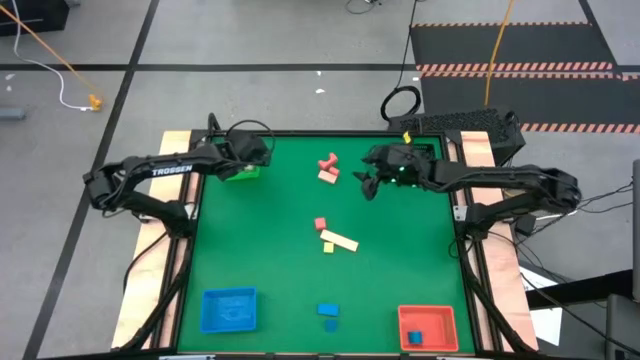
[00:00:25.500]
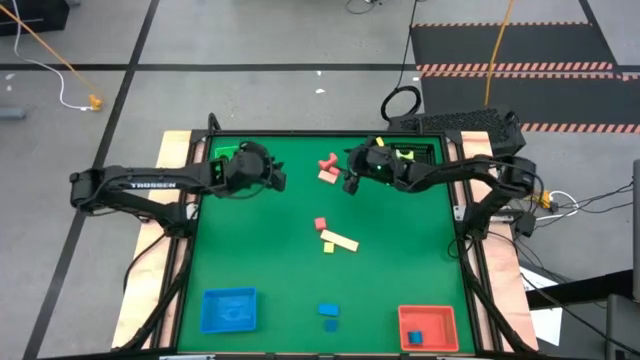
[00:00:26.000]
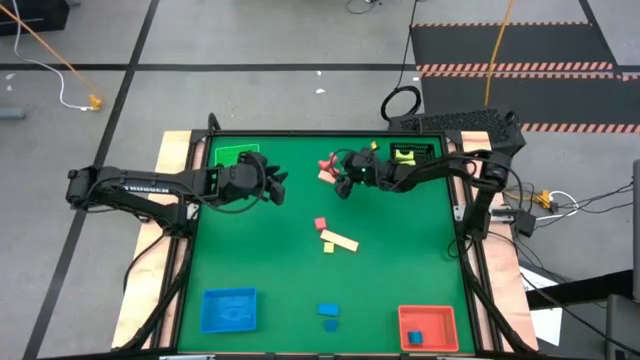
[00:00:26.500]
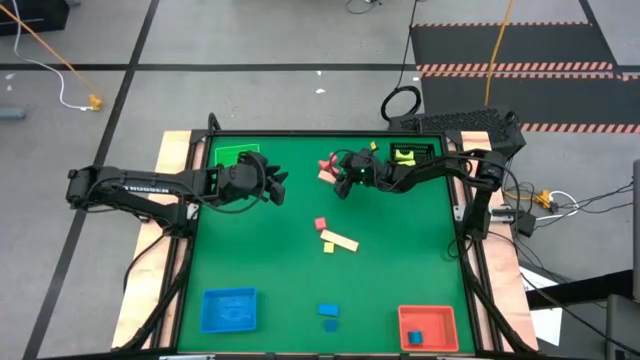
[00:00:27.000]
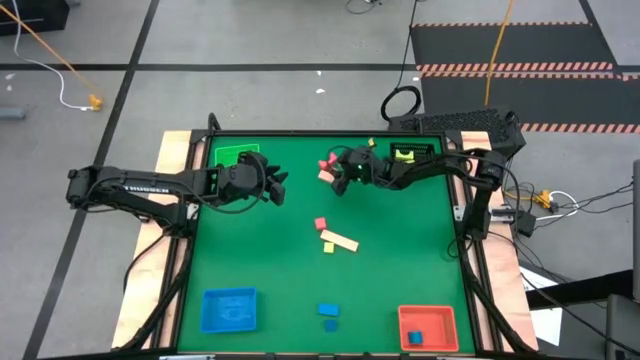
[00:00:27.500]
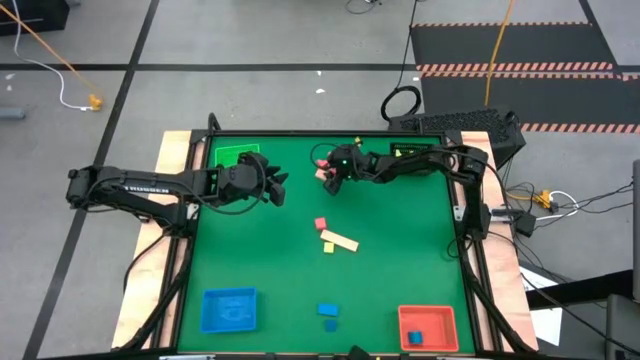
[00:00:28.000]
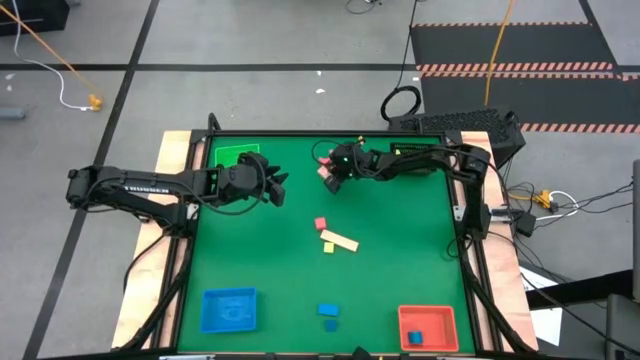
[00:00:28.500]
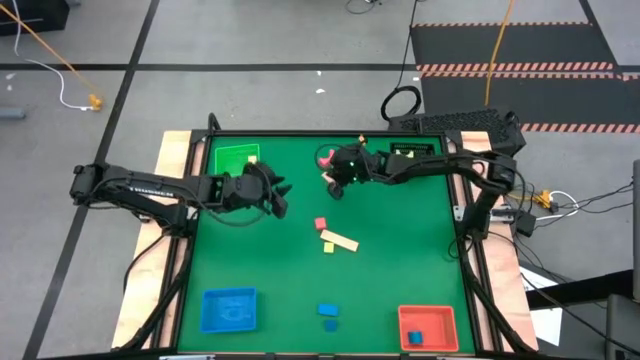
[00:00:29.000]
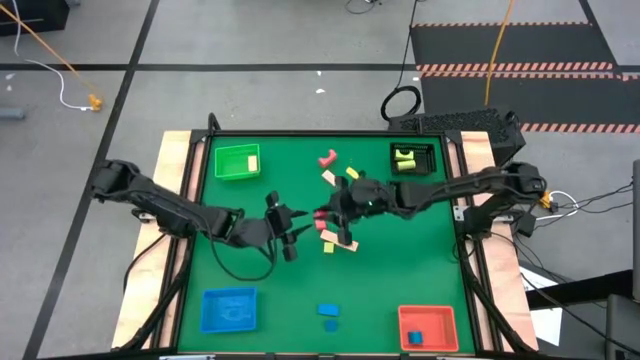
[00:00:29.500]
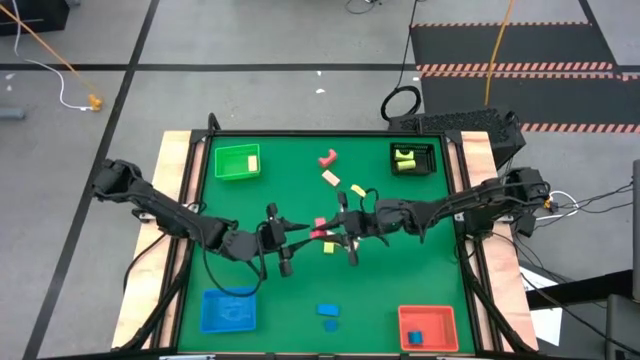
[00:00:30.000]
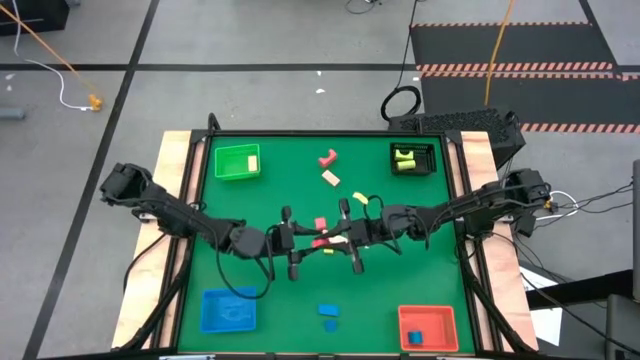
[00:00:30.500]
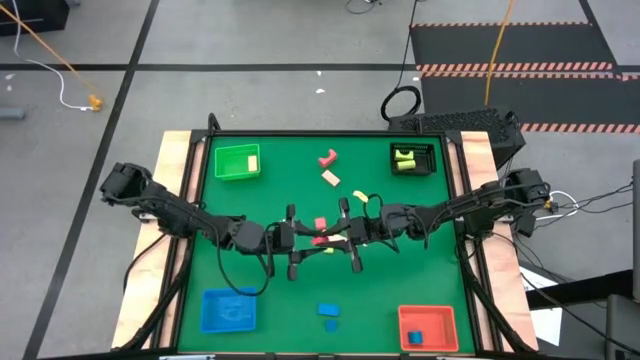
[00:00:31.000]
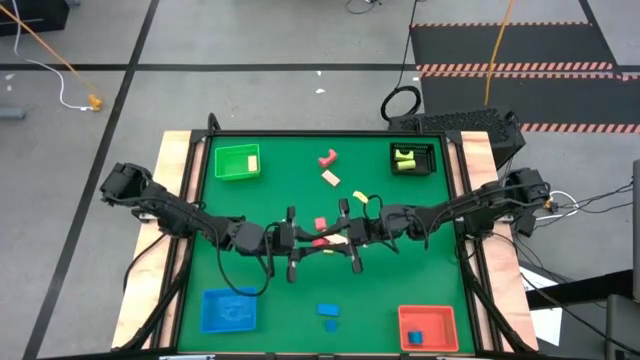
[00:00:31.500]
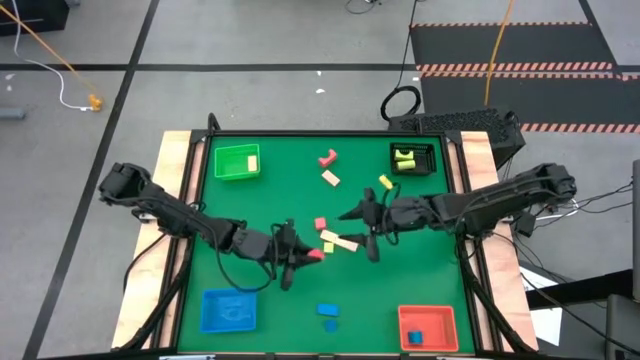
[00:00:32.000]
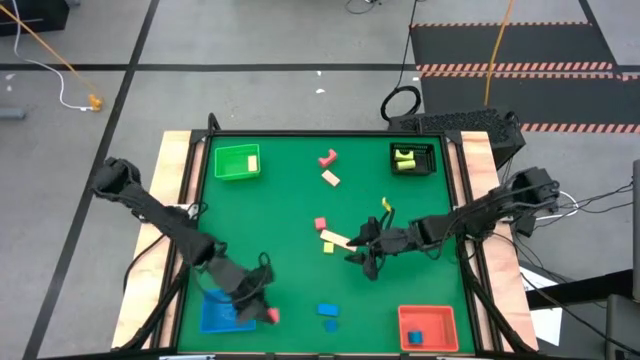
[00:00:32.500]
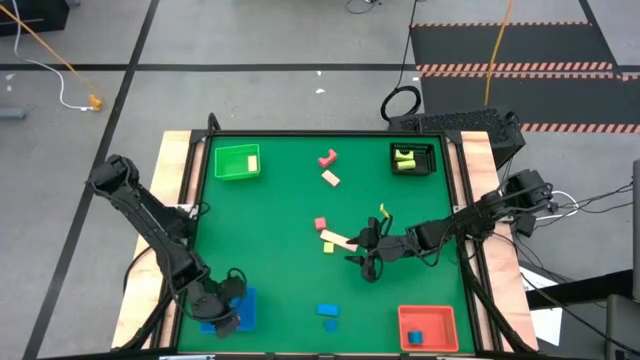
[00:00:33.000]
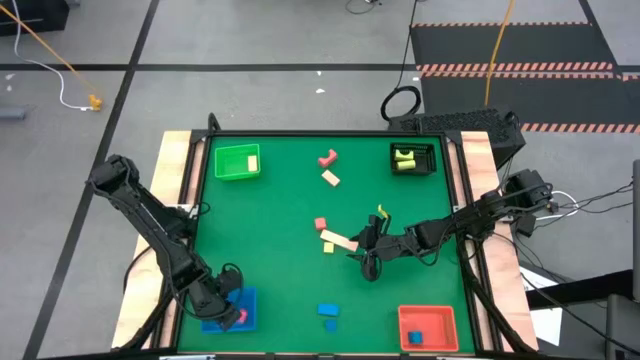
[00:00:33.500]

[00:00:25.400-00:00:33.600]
Task: Sort & place blocks by color
Put the middle orange block into the blue bin

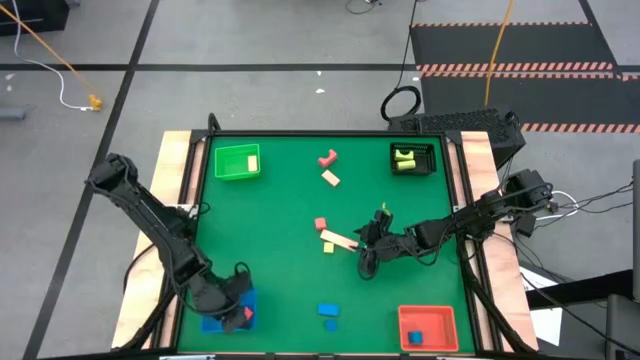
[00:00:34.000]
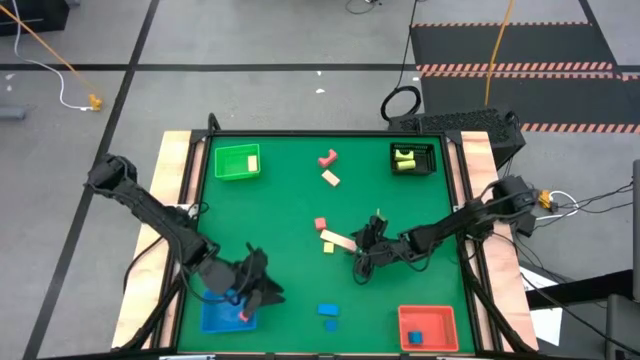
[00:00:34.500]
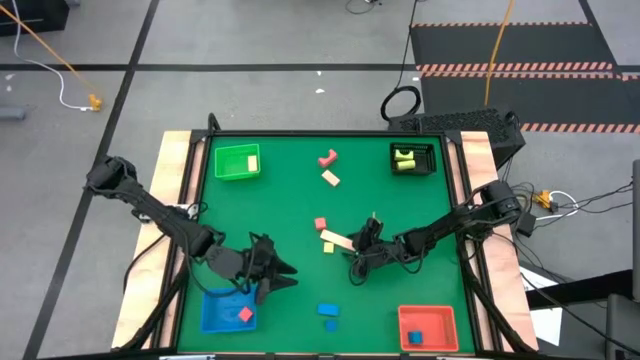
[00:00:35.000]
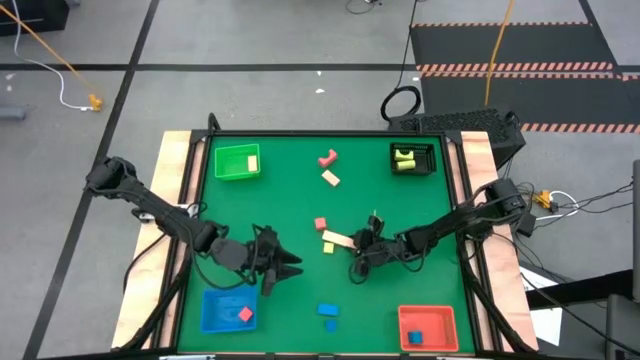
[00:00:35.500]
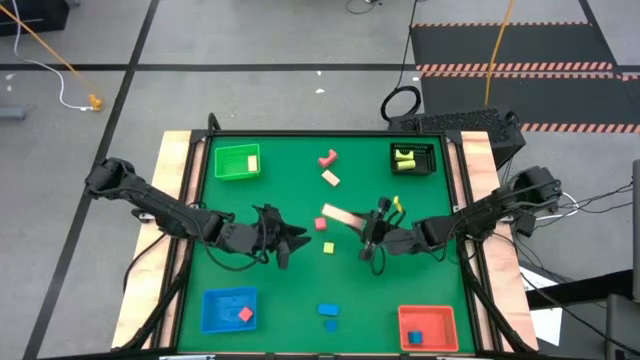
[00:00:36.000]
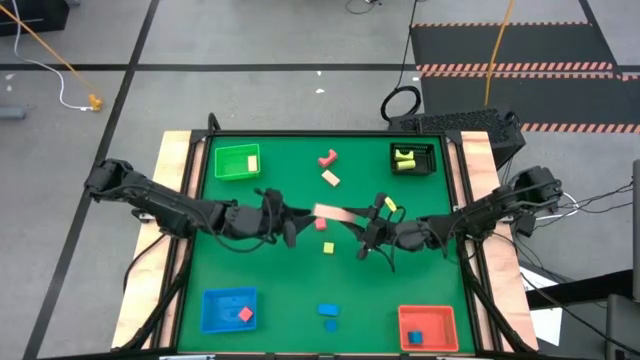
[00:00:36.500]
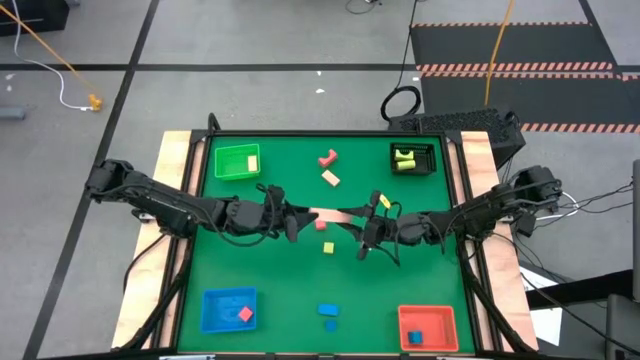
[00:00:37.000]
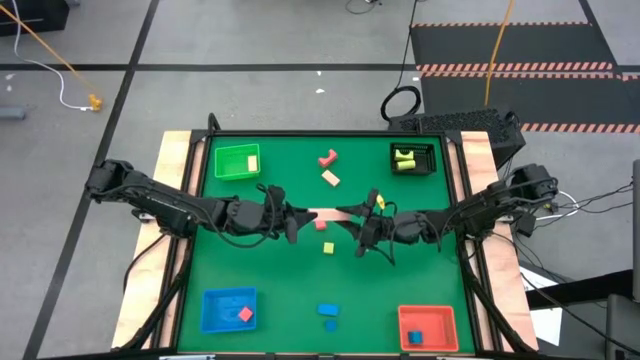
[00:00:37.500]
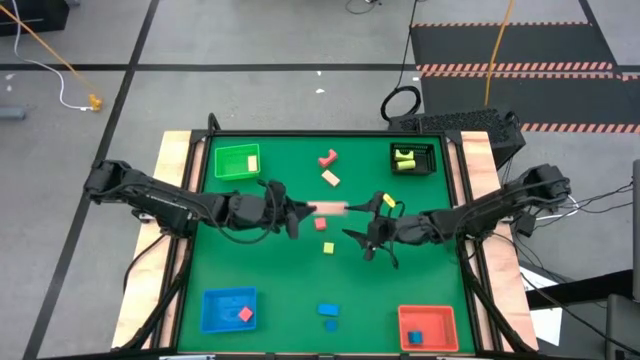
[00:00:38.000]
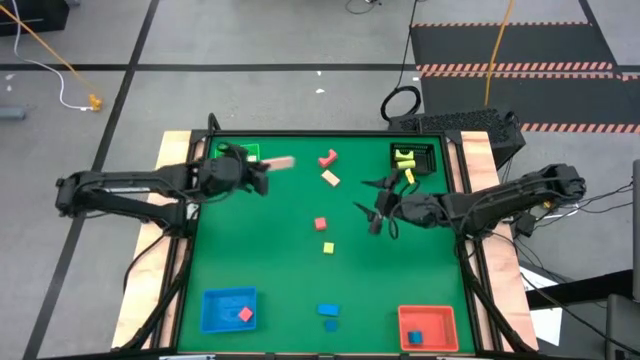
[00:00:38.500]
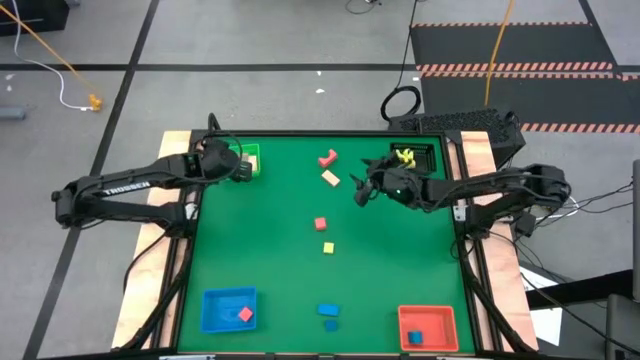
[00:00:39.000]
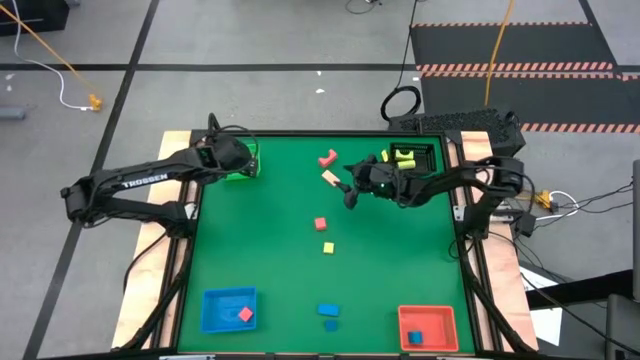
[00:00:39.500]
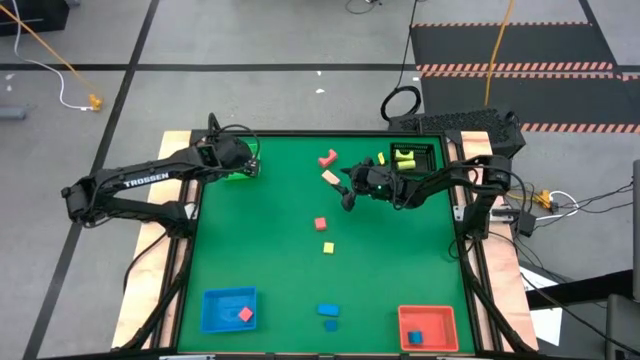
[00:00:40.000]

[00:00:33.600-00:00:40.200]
Put the bottom light orange block into the green bin

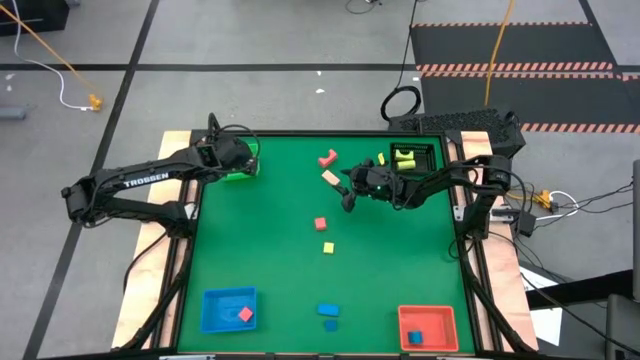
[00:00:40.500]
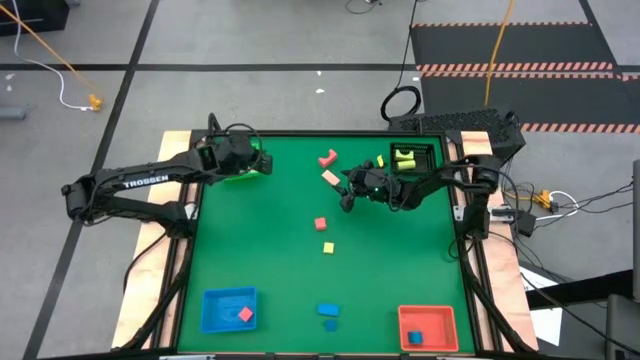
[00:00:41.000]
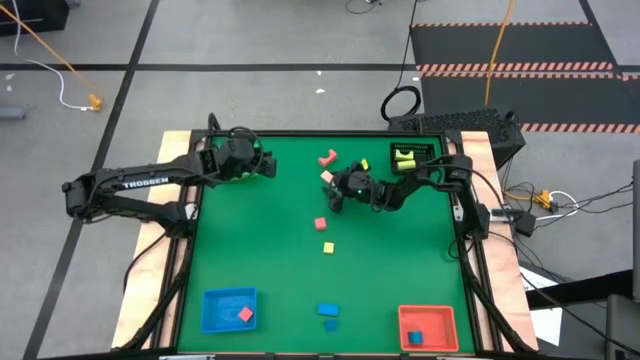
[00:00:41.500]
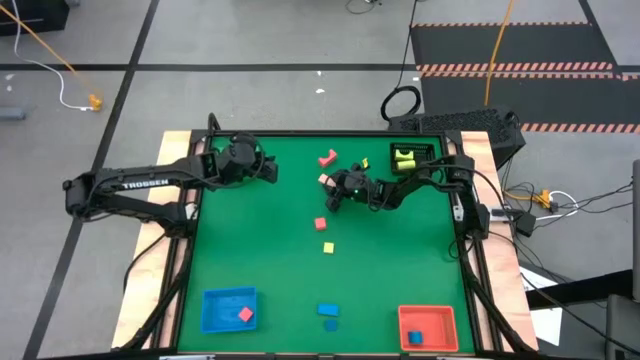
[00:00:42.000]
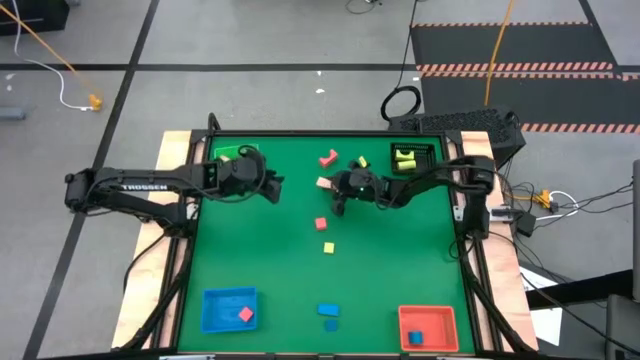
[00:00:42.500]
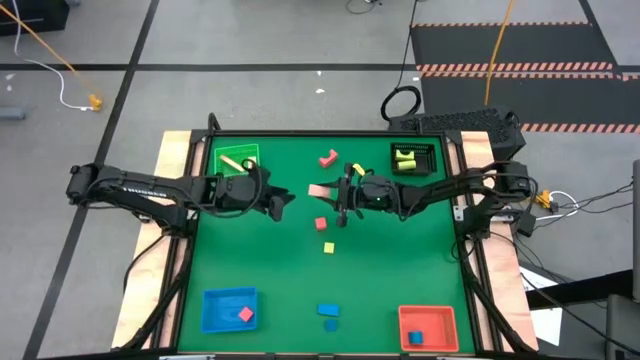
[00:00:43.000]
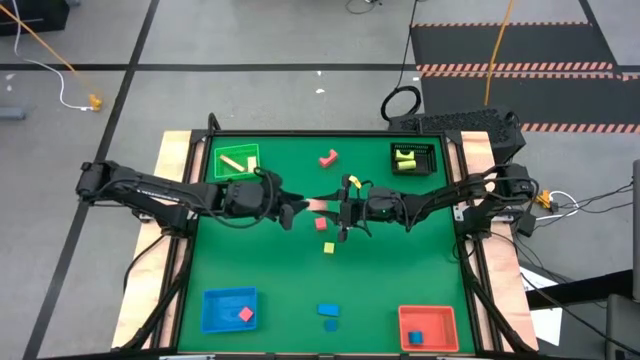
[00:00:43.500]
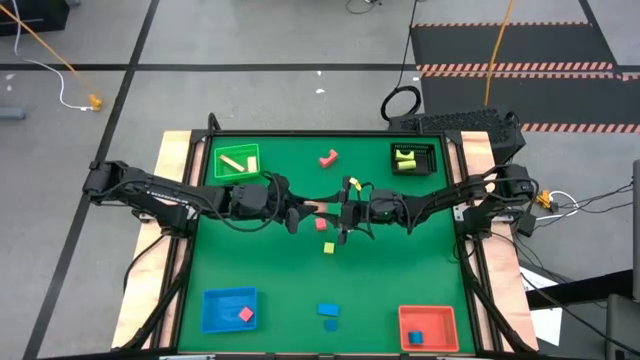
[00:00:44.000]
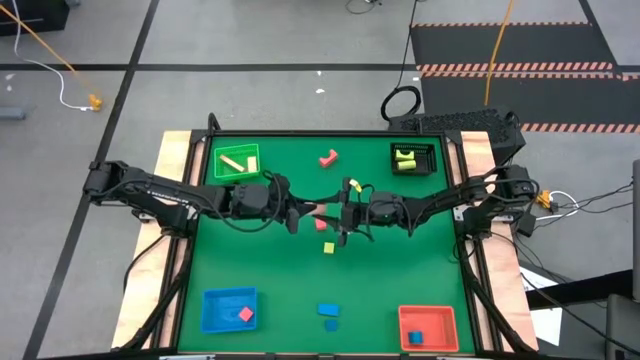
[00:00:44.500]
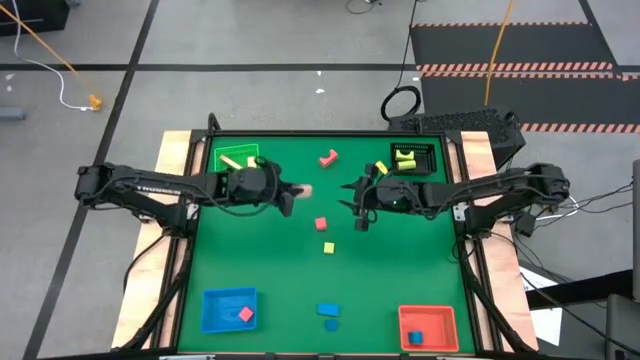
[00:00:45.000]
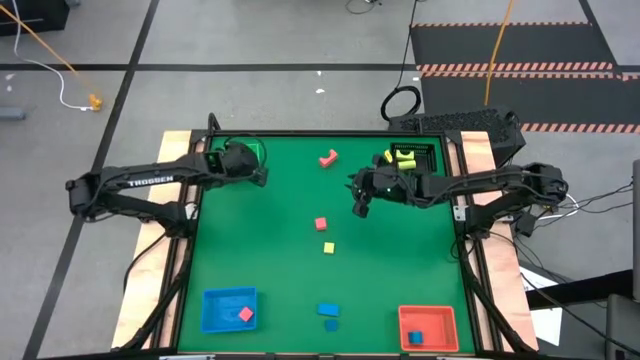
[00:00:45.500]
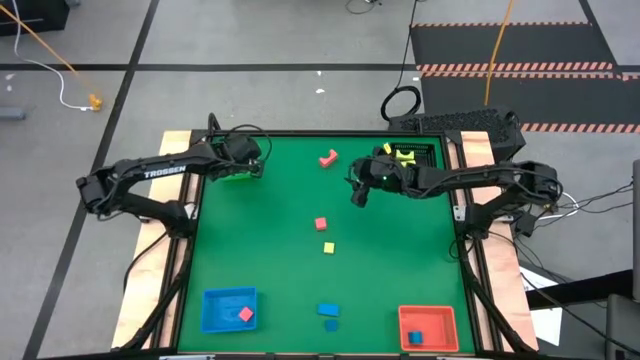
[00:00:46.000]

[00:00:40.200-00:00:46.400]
Put the light orange block into the green bin
